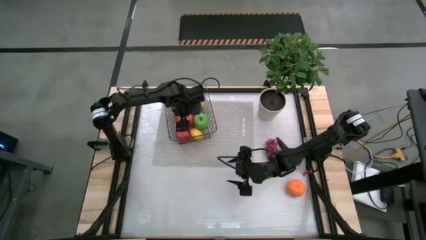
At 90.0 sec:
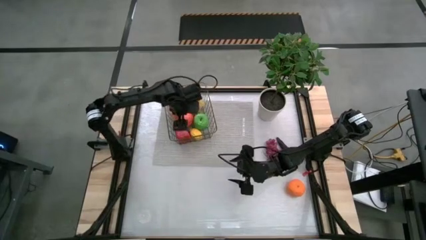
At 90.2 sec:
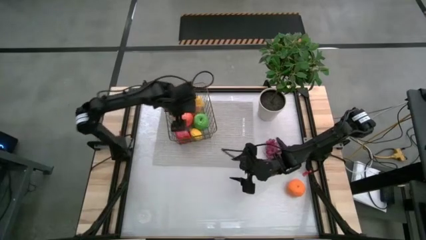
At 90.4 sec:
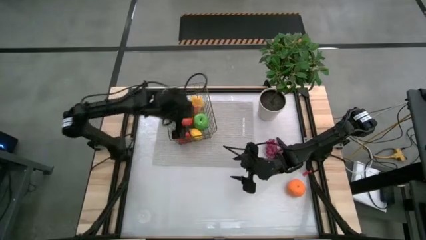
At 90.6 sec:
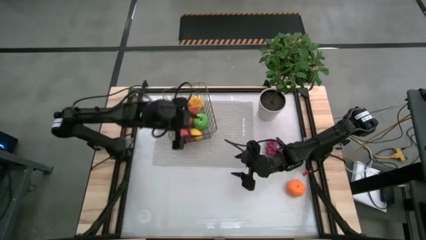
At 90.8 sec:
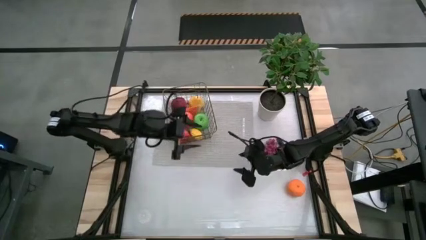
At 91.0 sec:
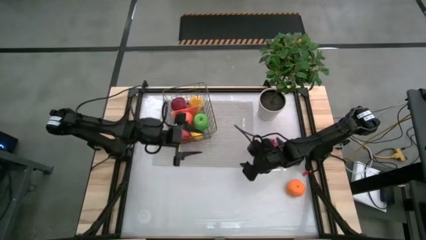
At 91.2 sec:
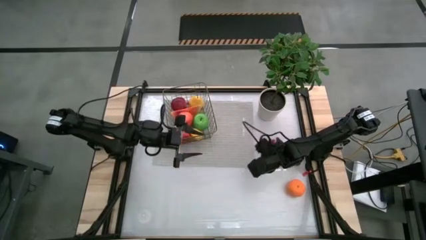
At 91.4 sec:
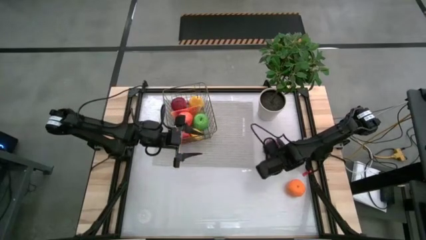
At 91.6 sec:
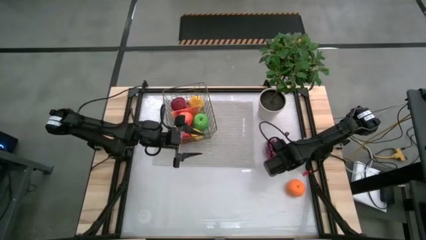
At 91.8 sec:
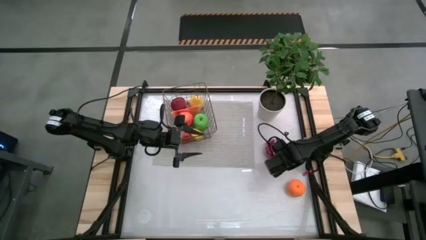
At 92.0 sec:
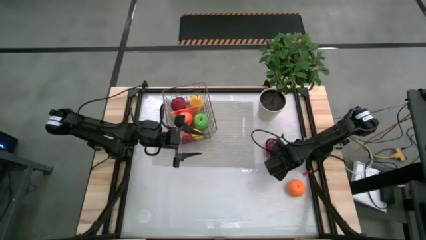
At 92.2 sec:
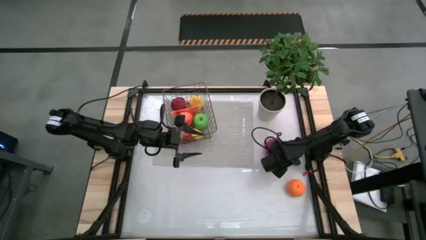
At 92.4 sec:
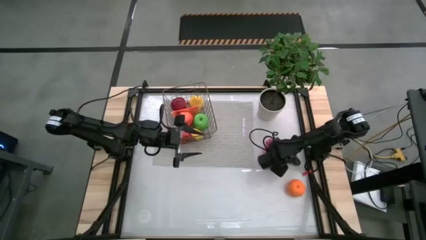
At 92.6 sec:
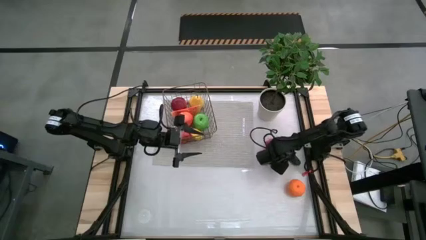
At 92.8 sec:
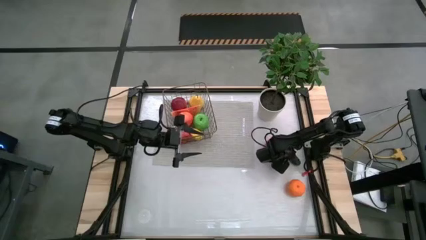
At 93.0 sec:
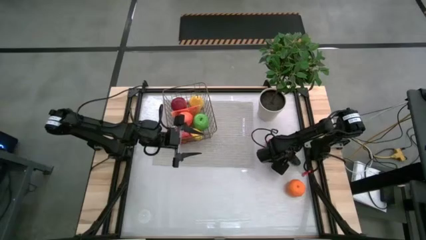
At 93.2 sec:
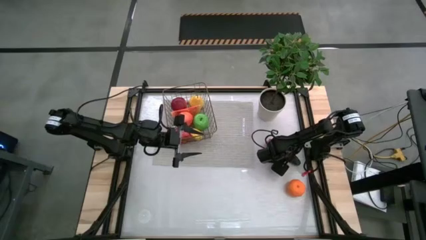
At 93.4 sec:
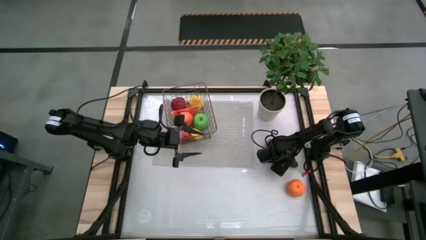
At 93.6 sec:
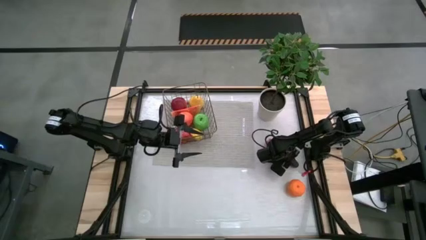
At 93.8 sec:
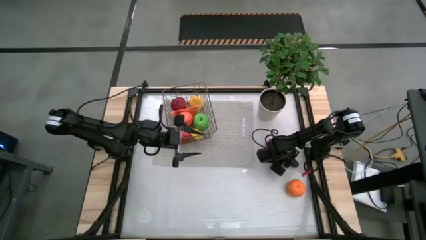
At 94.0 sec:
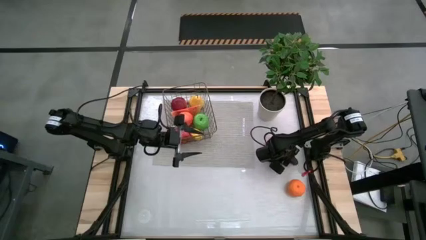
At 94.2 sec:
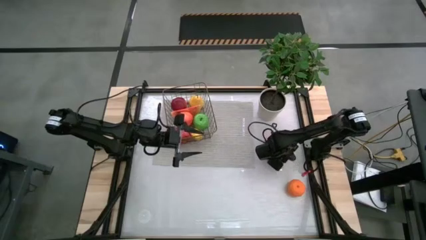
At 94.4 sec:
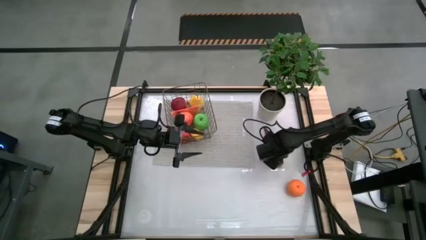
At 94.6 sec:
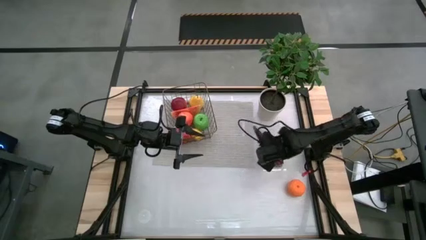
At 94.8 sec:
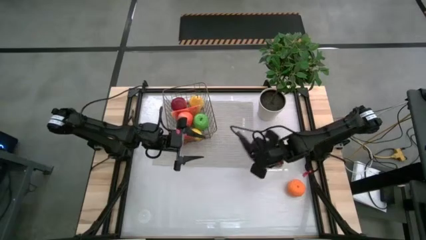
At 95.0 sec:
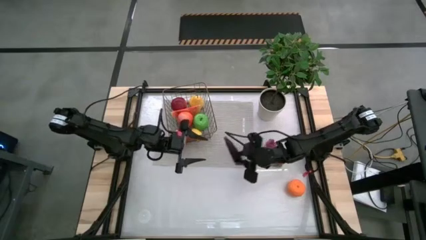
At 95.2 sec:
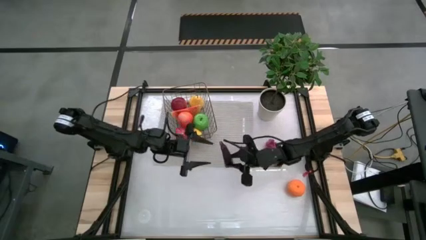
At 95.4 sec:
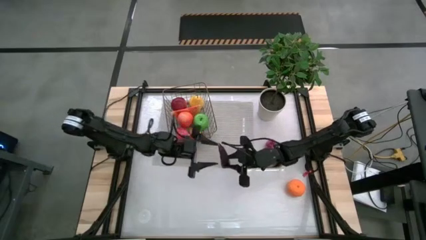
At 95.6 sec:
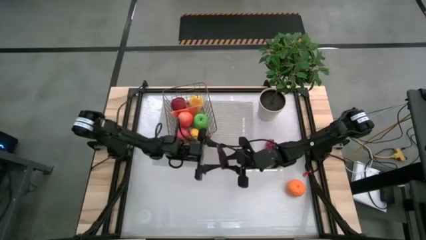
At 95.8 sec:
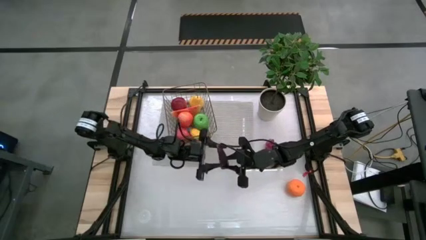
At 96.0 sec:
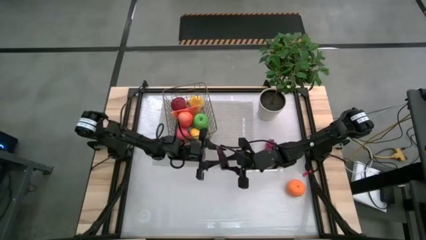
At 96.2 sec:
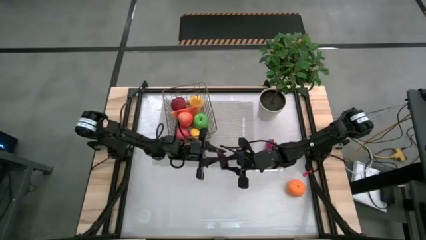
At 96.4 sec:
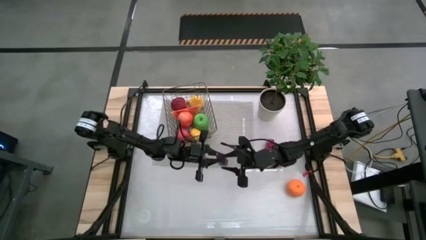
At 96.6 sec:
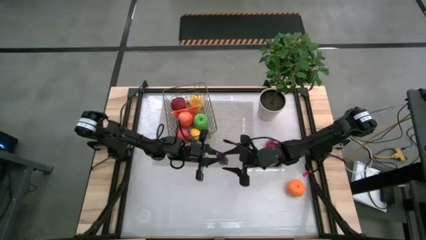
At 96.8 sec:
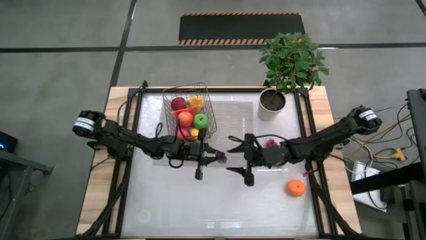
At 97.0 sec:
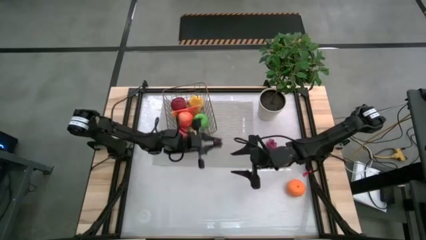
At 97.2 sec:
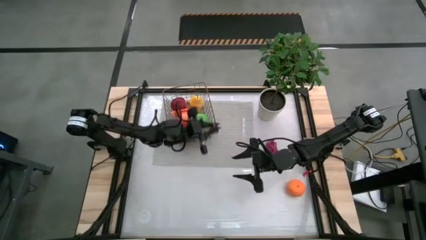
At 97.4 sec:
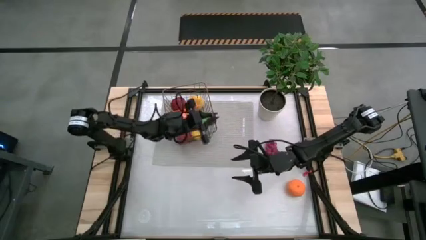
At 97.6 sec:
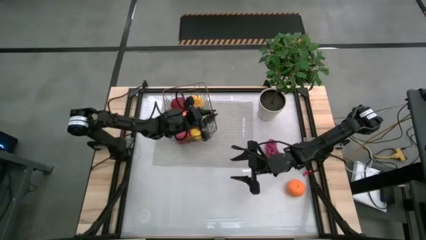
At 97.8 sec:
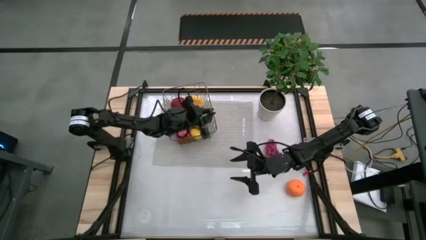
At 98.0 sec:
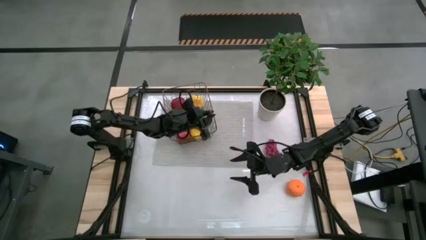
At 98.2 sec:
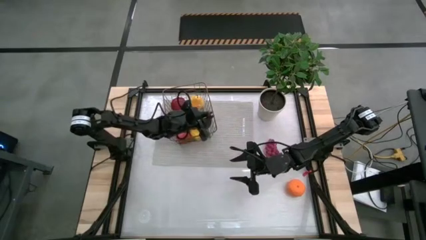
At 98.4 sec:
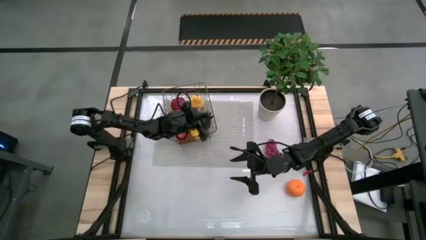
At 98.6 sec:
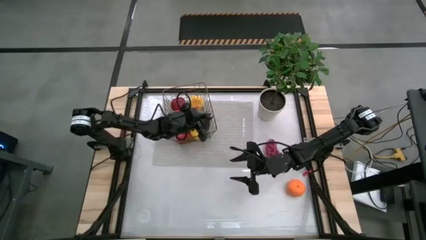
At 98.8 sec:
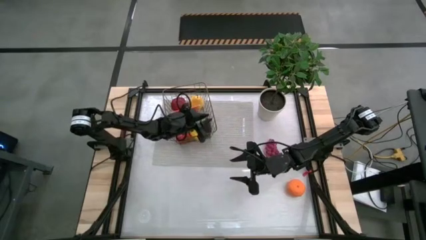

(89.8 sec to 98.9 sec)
Task: Build produce basket
Put the purple eggplant into the brown wire basket

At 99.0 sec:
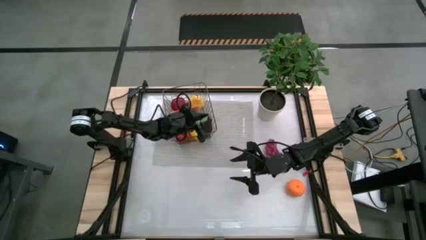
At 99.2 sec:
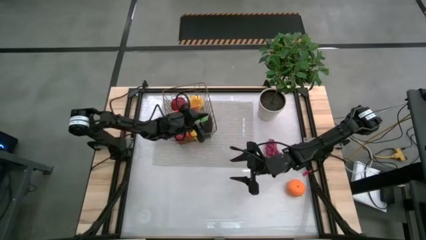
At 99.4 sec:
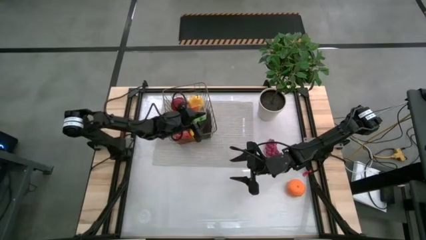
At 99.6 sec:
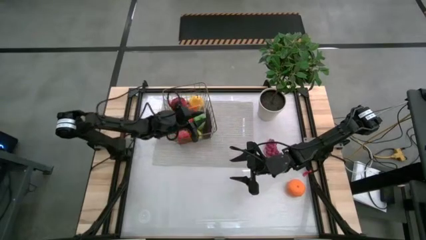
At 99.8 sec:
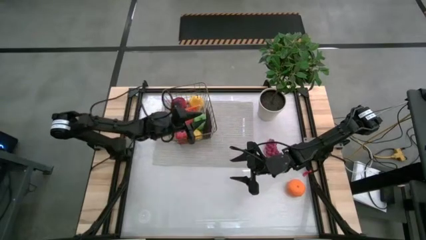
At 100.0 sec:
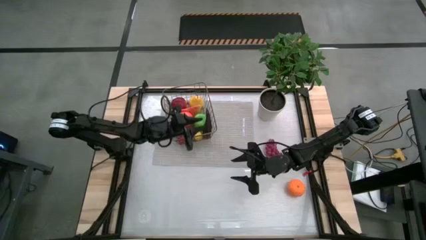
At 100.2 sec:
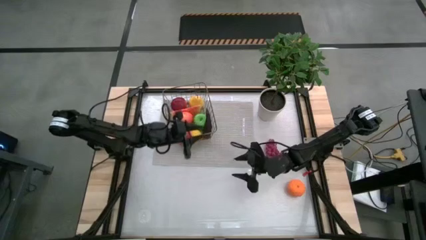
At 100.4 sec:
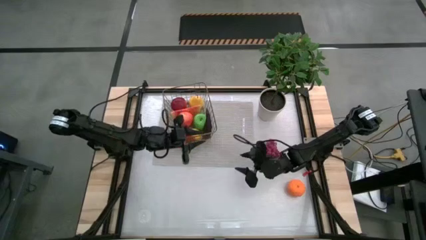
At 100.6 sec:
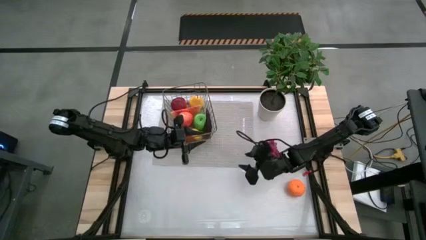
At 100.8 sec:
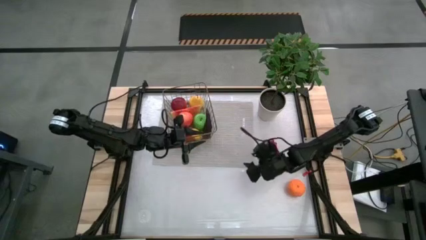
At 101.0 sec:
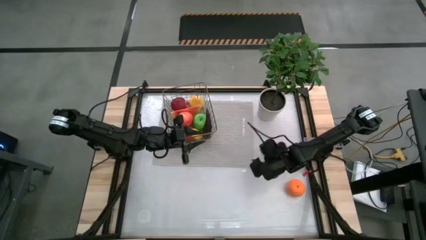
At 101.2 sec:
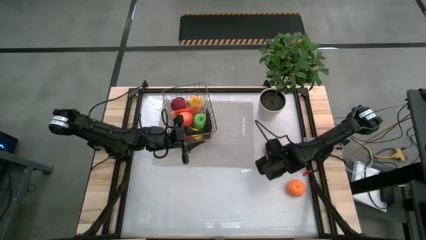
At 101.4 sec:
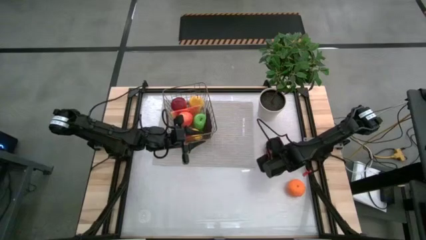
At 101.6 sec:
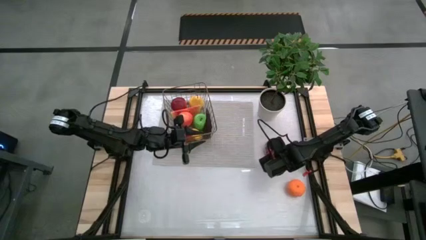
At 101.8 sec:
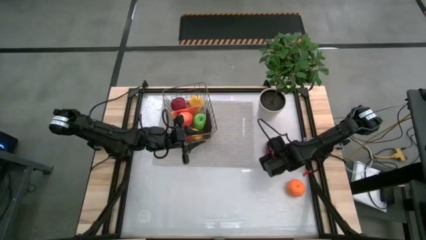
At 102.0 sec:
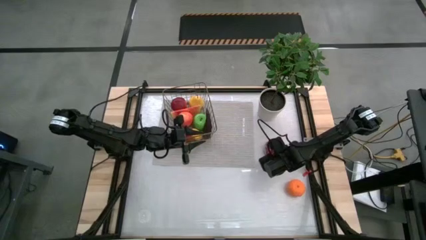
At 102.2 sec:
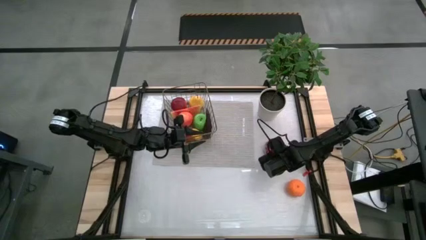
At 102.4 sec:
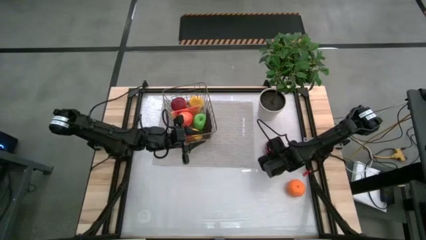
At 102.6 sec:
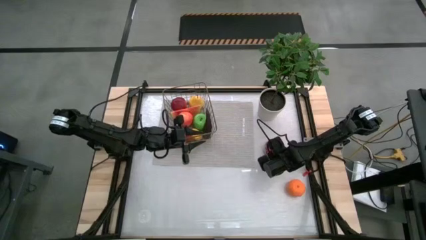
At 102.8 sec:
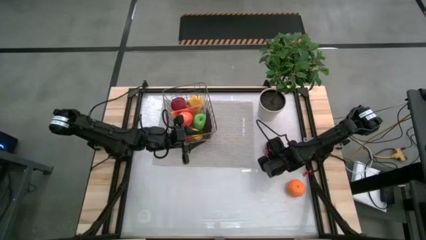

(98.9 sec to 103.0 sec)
Put the purple grapes into the brown wire basket

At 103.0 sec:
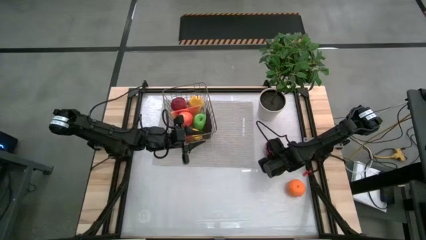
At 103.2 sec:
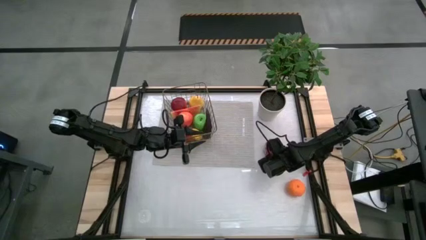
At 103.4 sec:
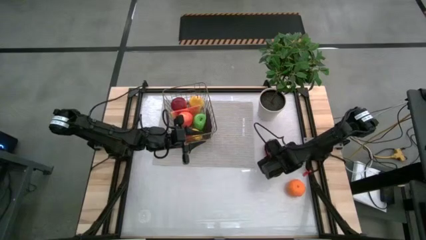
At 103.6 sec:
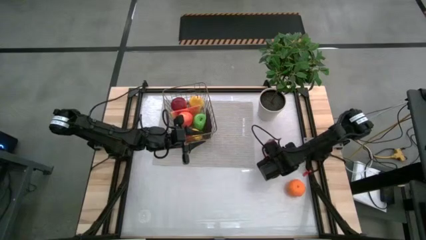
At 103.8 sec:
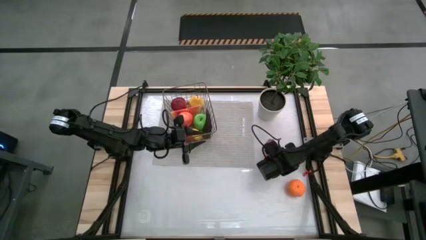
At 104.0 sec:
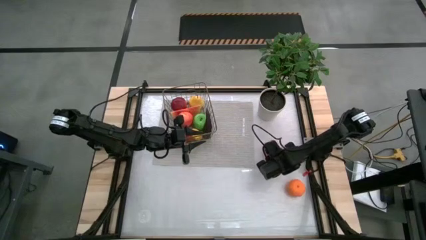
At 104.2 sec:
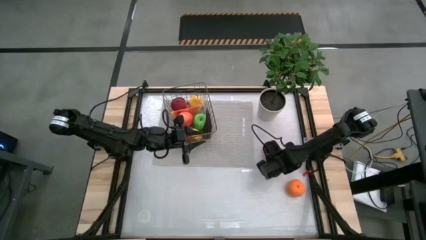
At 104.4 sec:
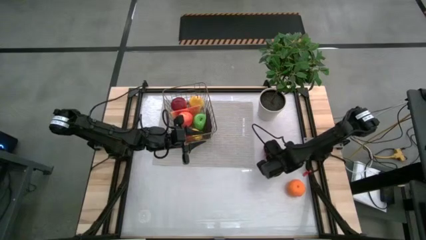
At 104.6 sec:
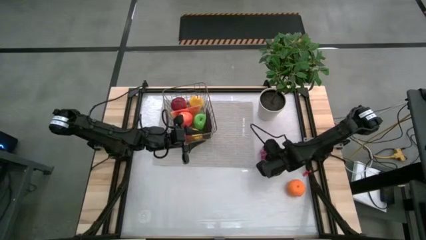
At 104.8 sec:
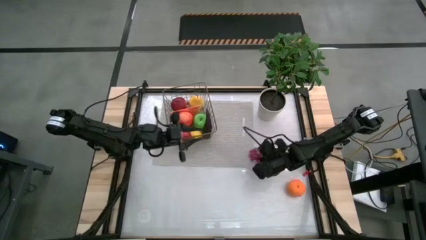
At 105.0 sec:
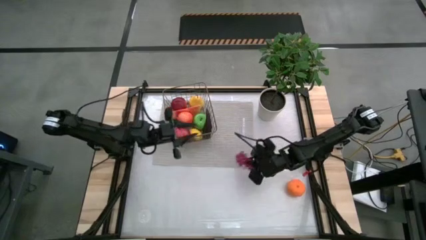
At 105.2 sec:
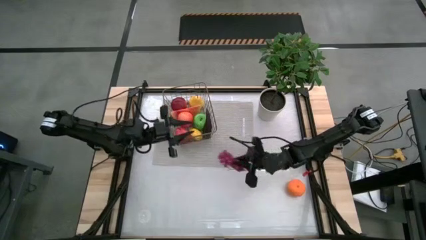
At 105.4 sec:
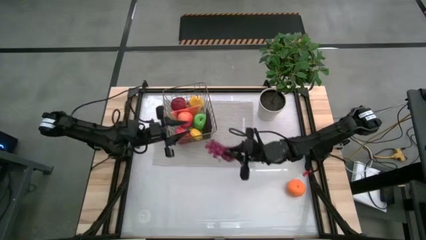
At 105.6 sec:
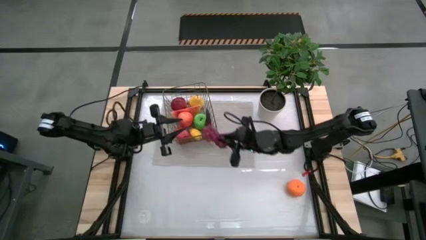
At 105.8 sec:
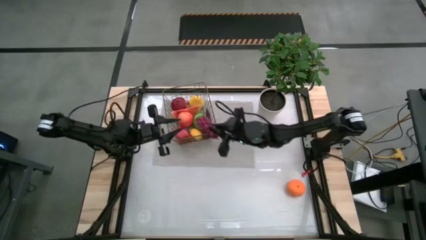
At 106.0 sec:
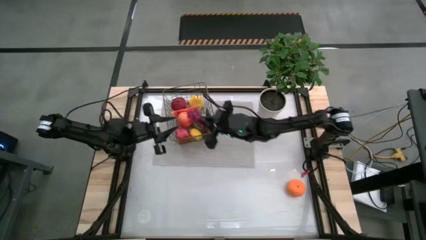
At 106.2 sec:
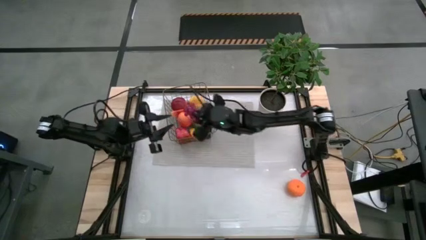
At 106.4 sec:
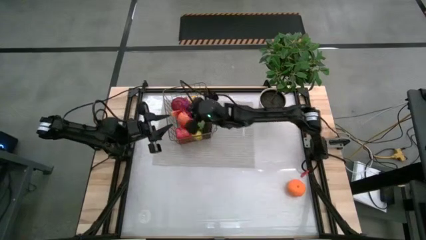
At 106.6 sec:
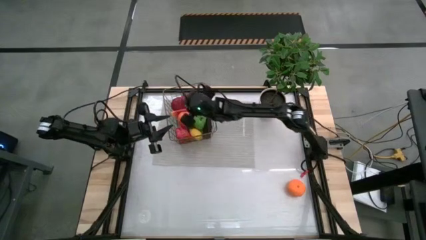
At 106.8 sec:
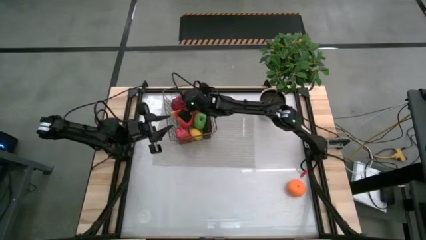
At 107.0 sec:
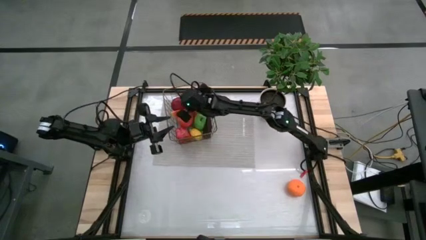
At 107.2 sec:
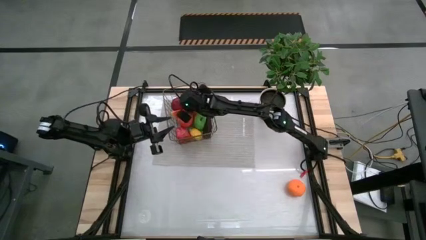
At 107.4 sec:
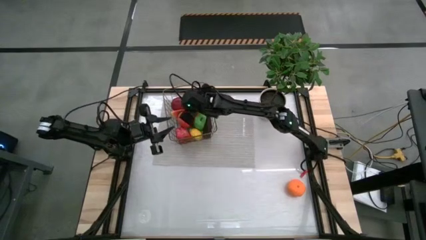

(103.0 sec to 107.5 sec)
Put the purple grapes into the brown wire basket
